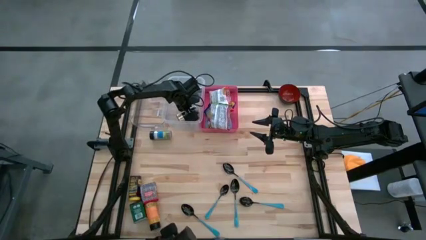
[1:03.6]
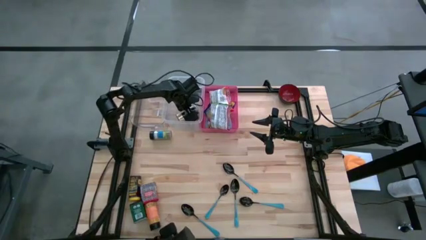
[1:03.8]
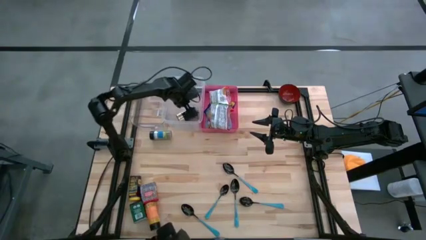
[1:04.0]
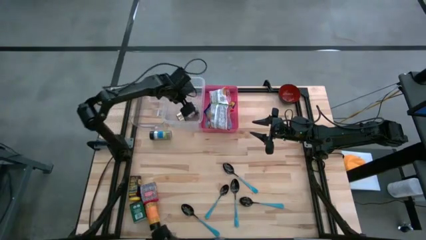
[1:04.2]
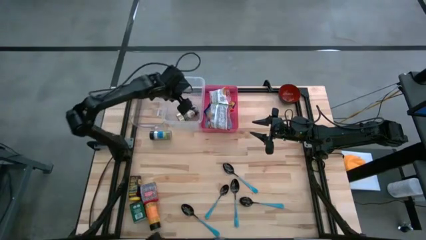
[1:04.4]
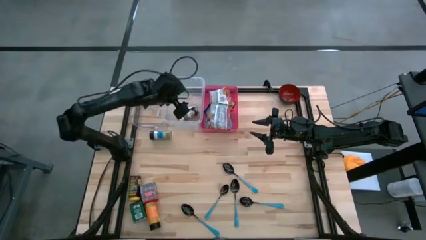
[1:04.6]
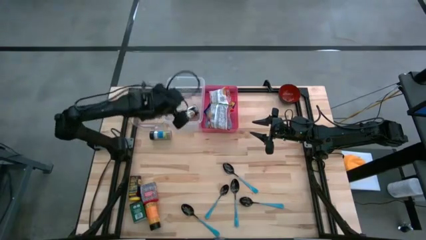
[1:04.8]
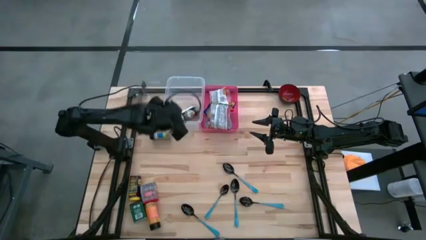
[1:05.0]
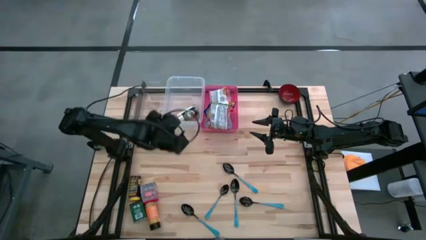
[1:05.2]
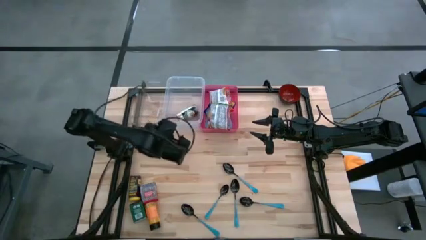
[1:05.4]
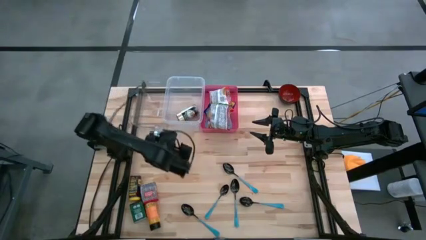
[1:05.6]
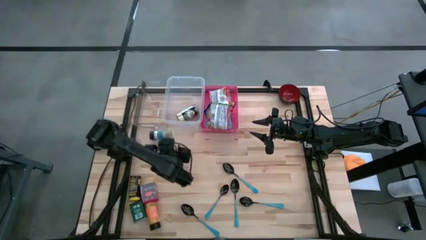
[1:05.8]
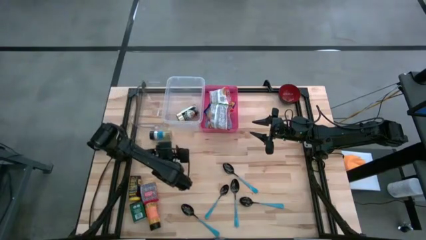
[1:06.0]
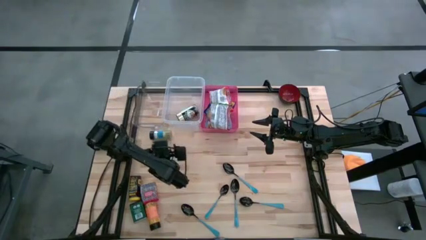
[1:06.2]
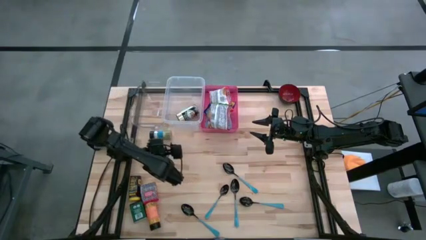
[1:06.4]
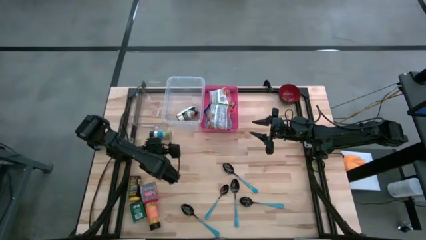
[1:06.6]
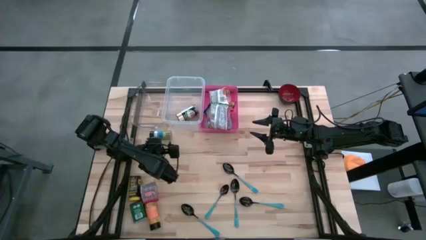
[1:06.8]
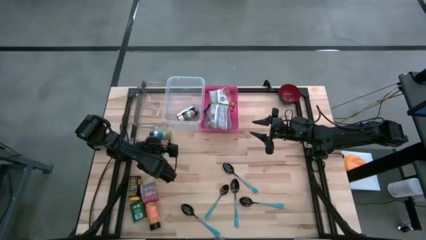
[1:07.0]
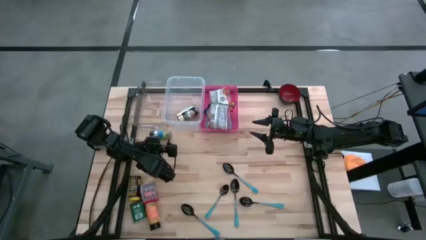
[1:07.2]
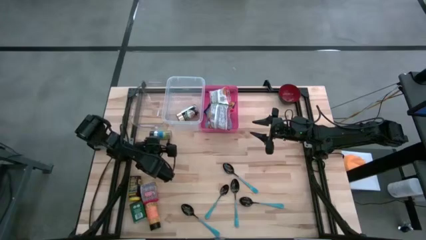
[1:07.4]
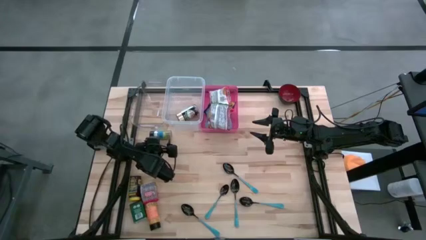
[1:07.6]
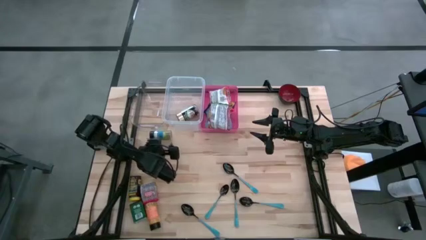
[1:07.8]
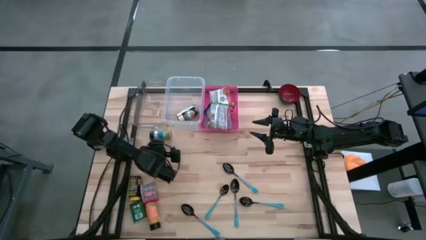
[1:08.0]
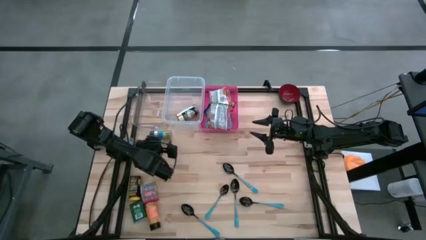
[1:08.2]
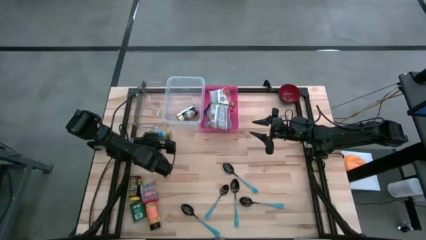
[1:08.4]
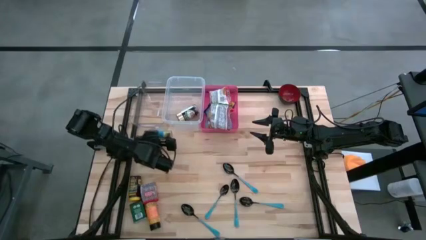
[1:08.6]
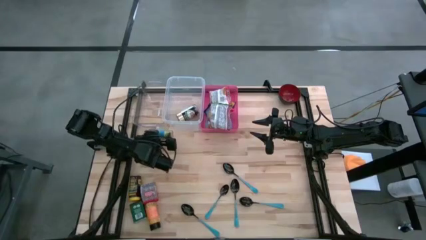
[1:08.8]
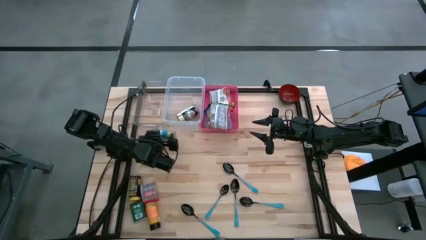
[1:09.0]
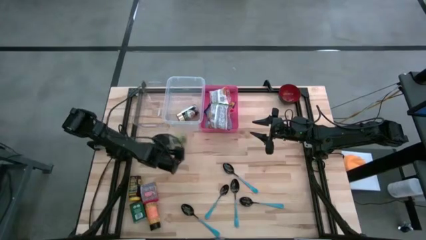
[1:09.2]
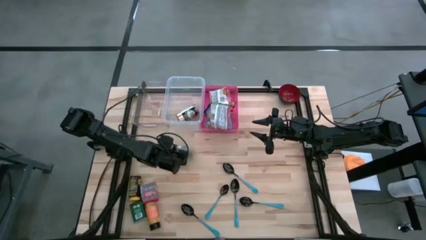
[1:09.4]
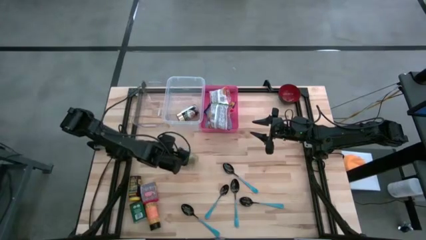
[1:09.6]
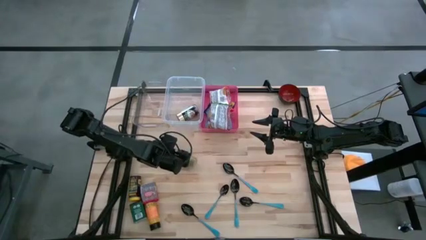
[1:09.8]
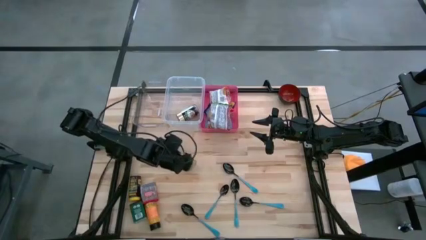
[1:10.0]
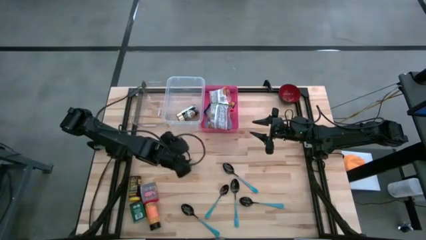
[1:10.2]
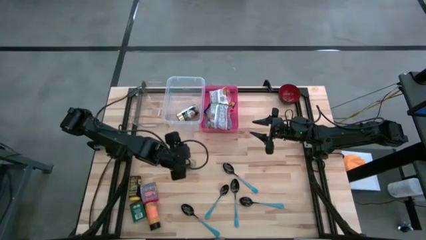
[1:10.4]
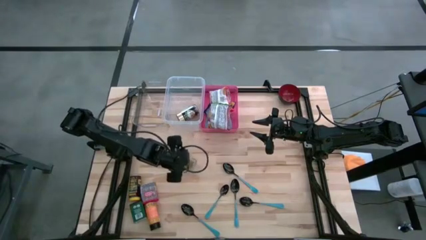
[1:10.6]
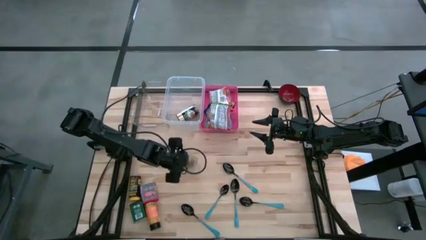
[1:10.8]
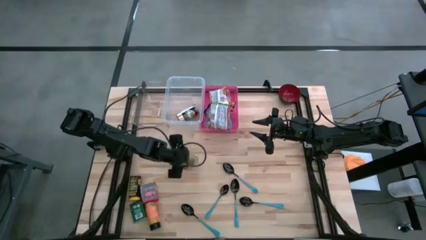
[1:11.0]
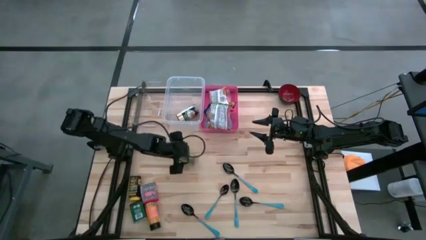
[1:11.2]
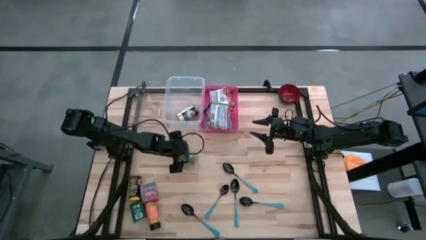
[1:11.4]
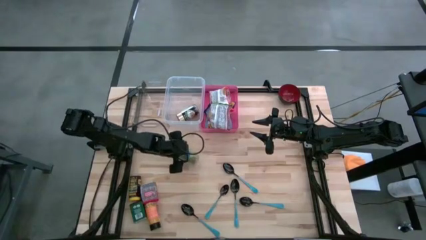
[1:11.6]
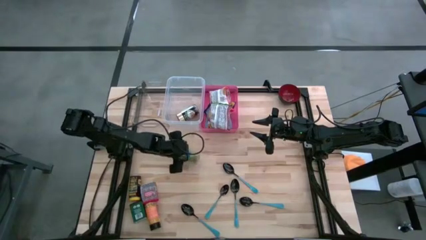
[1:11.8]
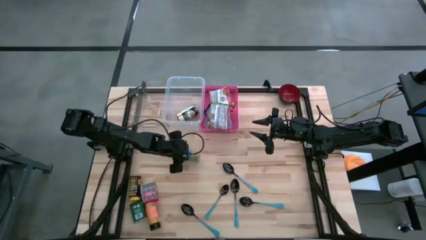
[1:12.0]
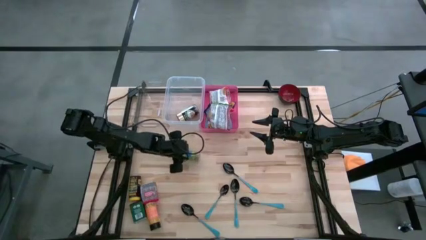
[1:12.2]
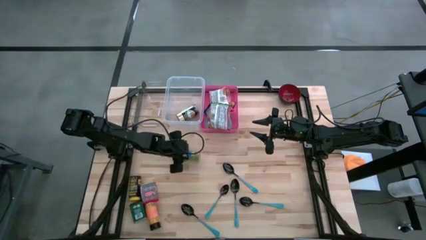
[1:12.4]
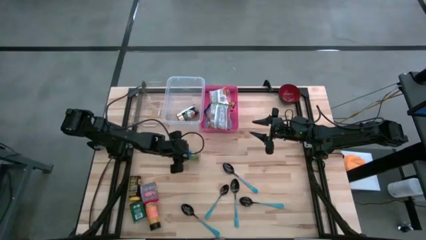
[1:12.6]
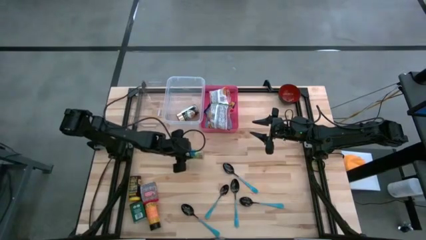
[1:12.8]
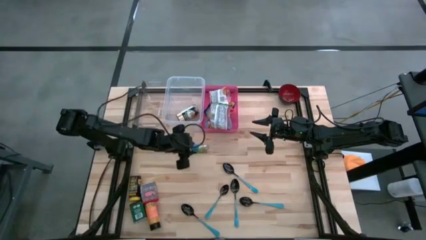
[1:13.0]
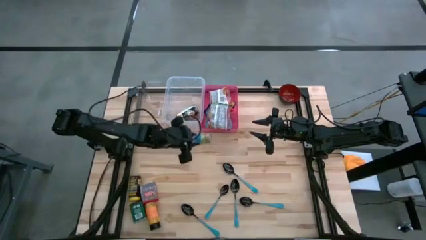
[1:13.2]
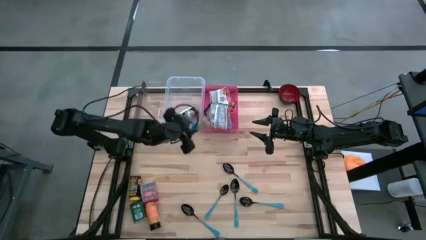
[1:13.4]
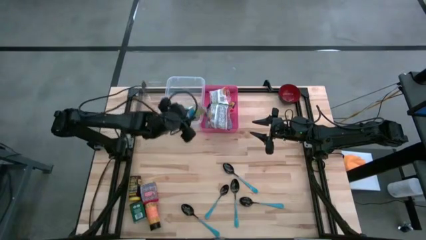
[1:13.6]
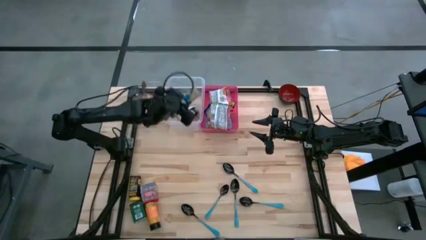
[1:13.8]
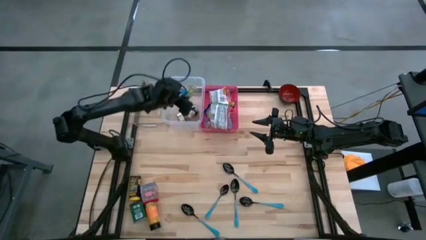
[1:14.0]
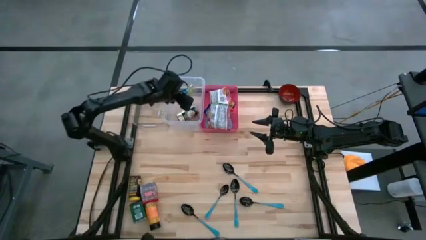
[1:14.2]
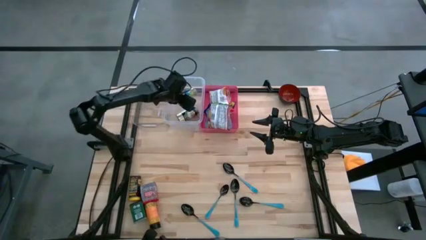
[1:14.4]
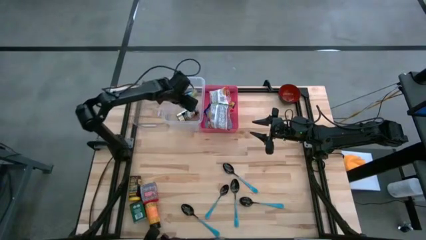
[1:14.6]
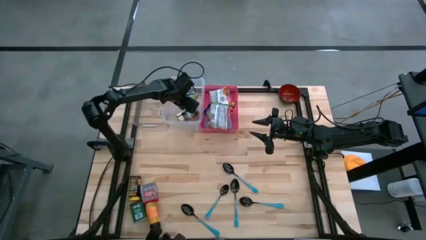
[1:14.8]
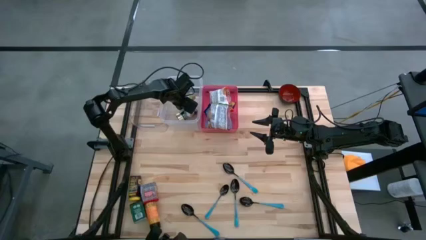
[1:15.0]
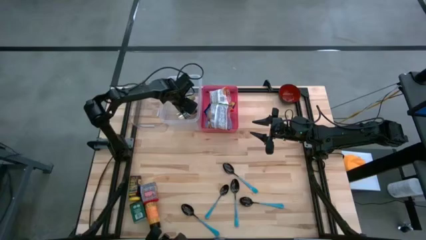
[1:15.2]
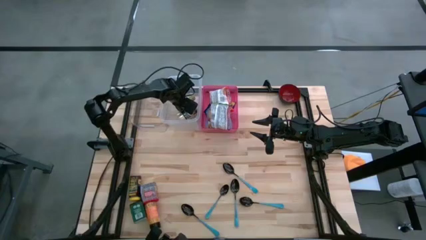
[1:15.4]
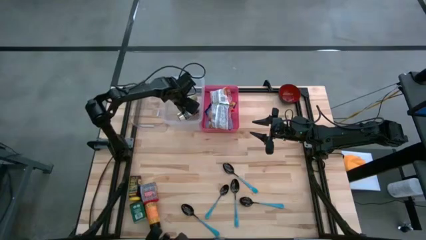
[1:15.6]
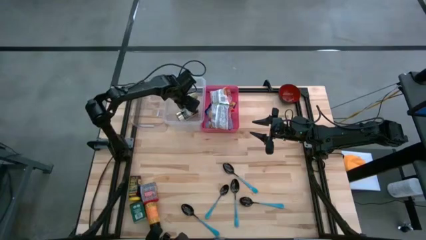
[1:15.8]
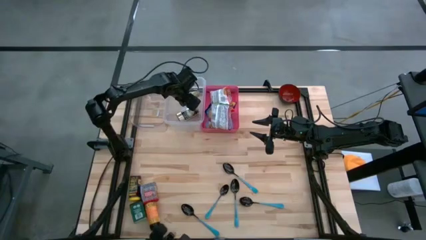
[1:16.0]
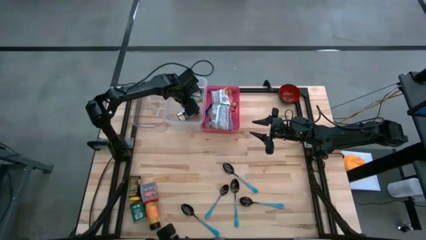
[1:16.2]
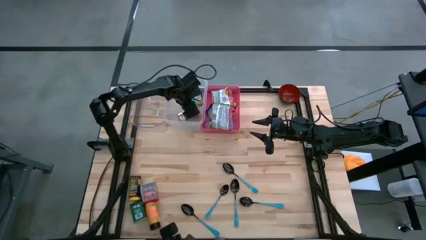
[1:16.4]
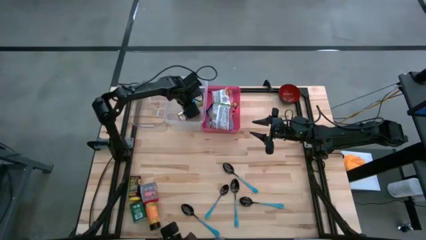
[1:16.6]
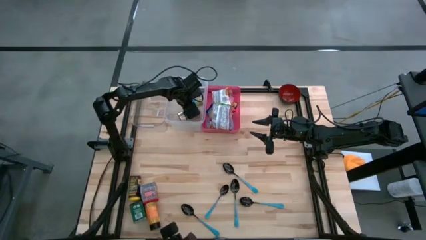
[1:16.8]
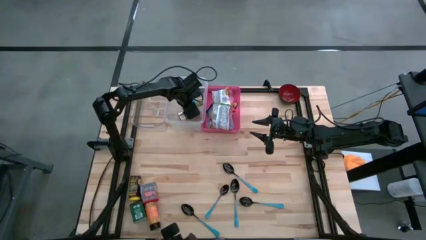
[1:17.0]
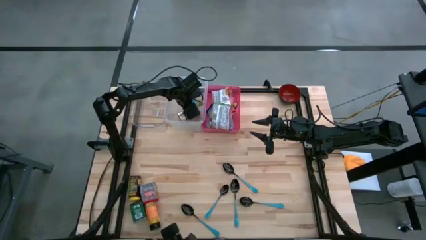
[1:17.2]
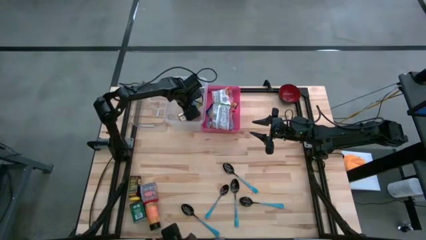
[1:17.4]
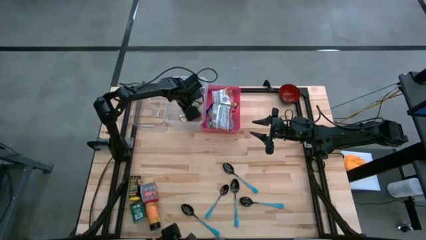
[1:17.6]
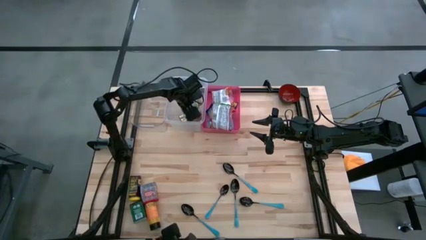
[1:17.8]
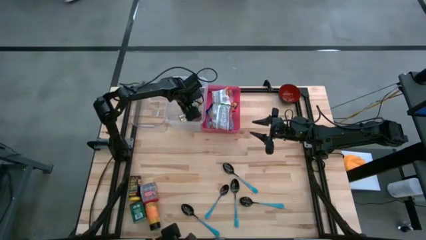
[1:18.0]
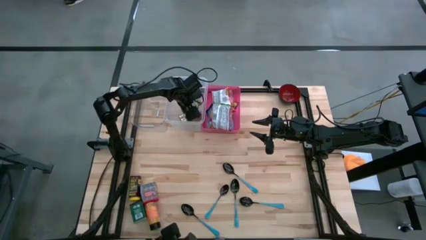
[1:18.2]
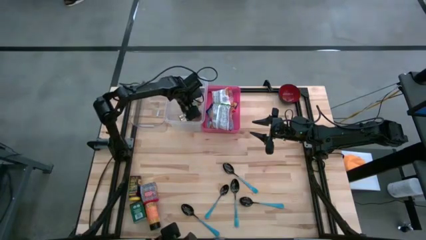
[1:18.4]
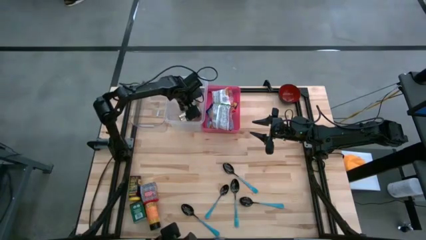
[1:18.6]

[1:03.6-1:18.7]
Put the green seasoning bottle into the right transparent bin
